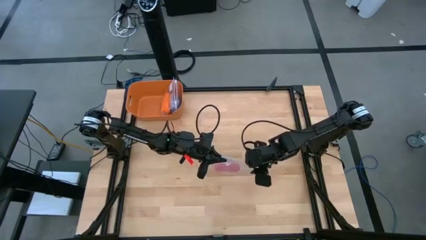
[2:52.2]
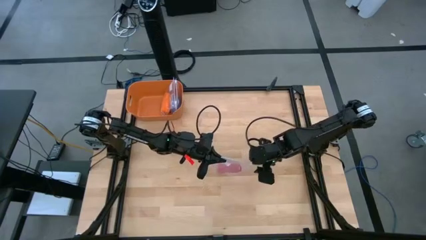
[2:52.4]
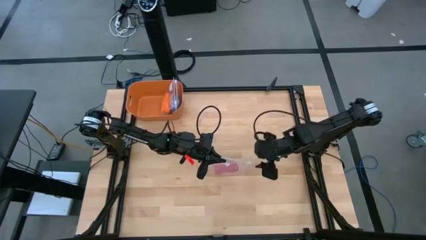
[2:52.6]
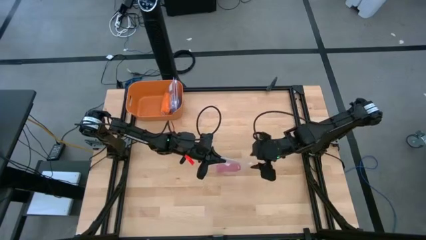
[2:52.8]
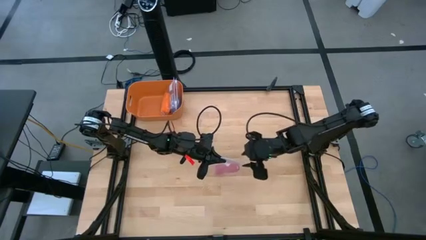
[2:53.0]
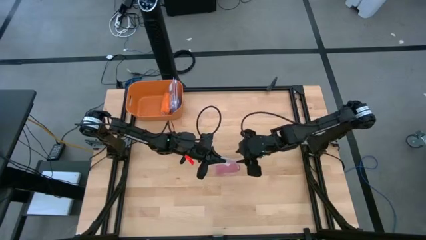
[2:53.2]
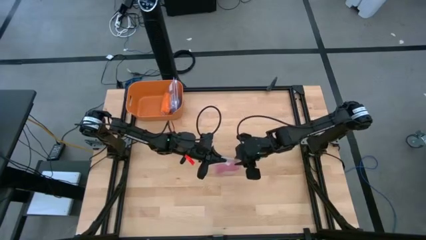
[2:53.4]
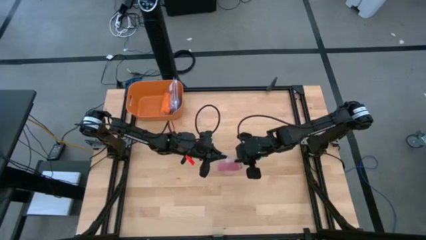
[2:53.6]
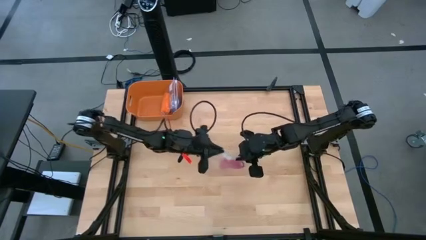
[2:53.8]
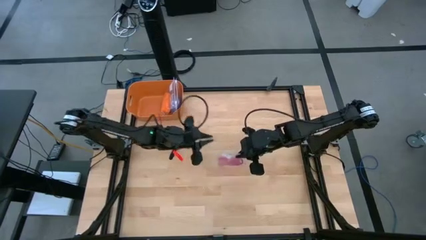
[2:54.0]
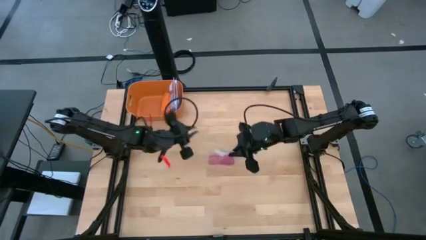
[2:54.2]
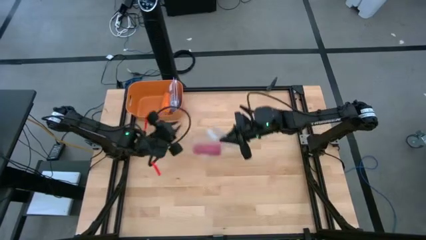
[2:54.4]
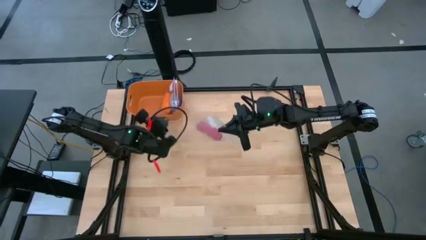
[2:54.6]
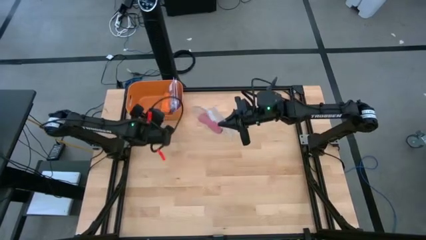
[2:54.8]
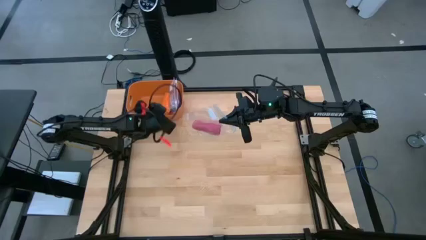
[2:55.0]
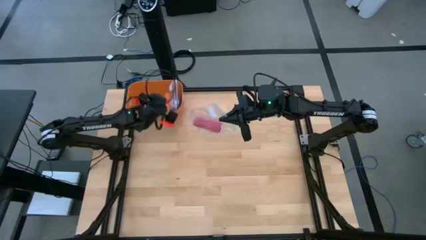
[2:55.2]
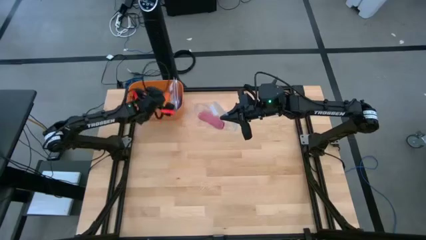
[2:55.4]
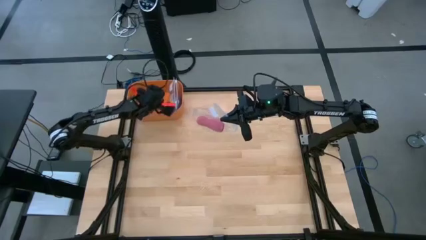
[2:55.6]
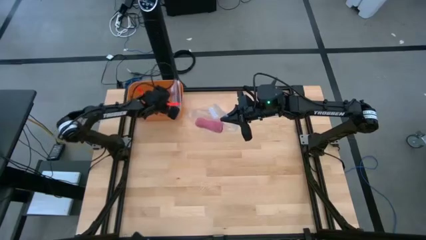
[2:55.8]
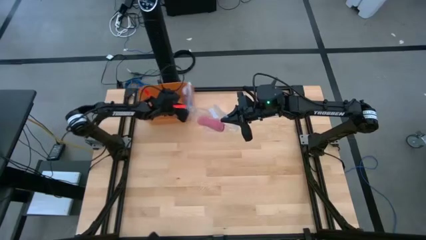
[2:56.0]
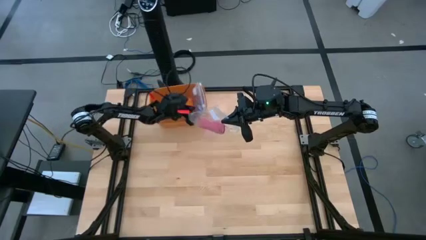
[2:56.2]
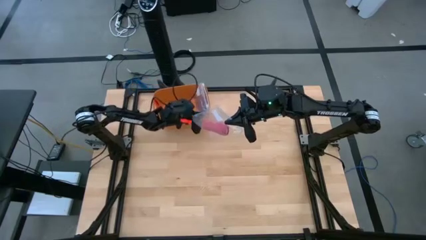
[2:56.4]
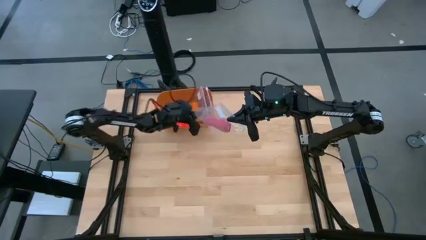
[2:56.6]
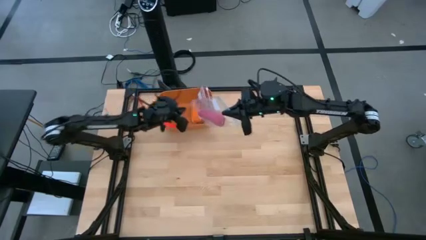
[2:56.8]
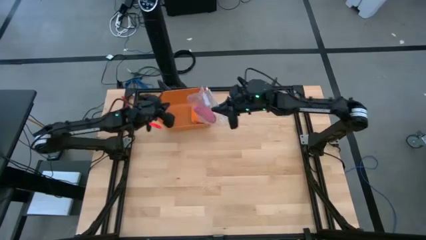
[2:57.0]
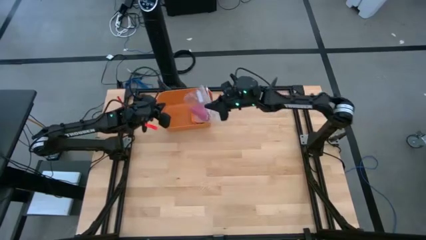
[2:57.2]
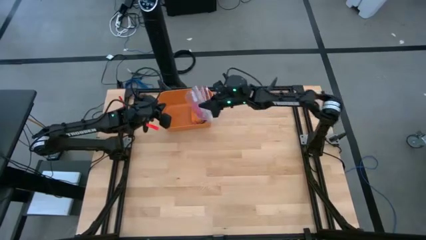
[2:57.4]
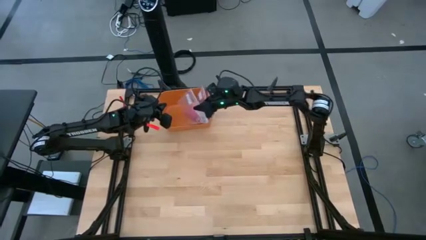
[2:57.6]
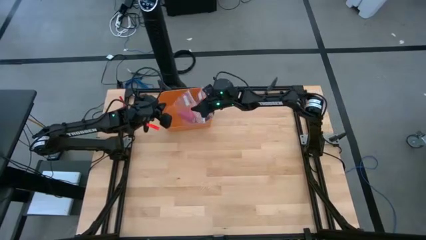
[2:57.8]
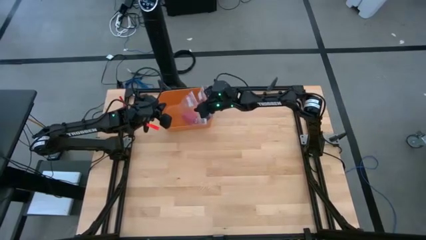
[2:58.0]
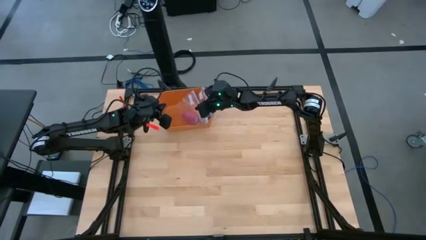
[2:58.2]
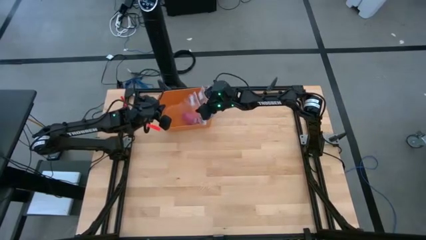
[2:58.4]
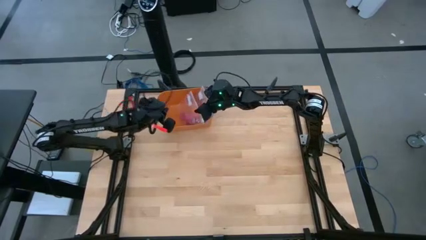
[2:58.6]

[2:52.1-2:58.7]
Task: Roll bandage
Put the transparent zip bag into the orange bin

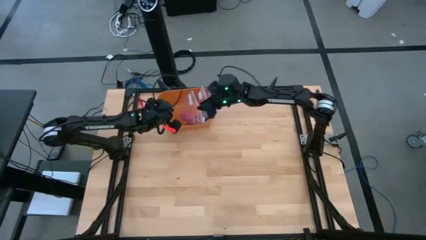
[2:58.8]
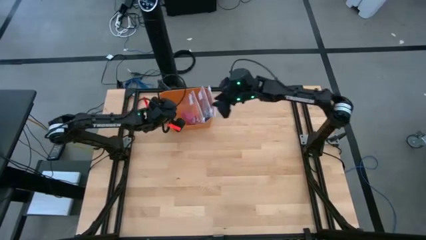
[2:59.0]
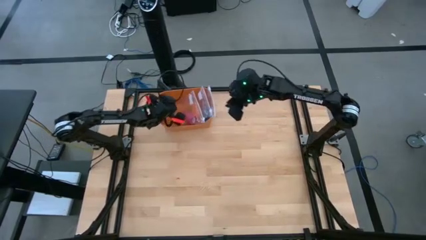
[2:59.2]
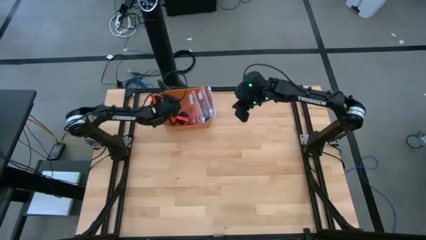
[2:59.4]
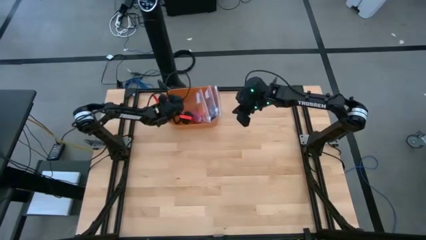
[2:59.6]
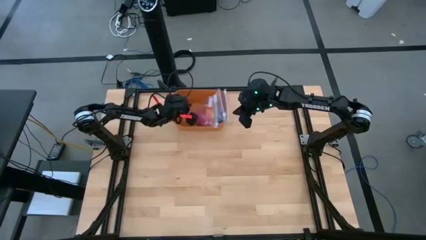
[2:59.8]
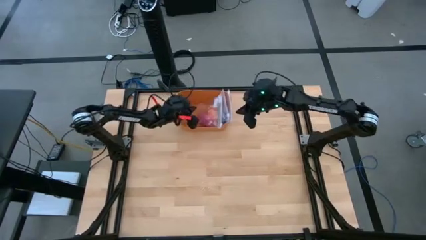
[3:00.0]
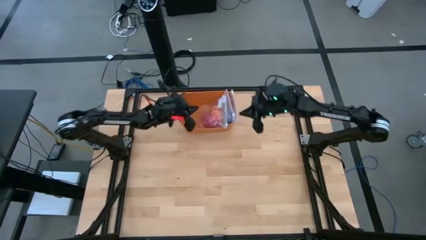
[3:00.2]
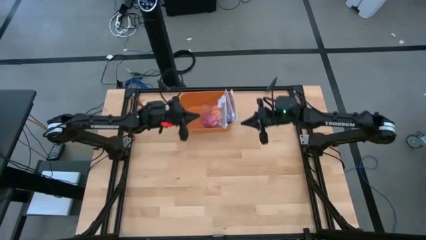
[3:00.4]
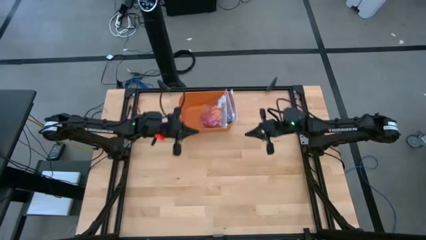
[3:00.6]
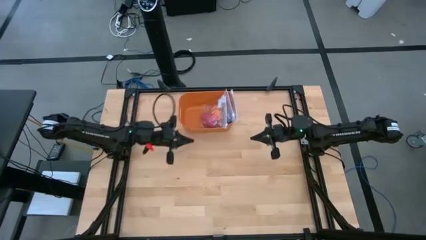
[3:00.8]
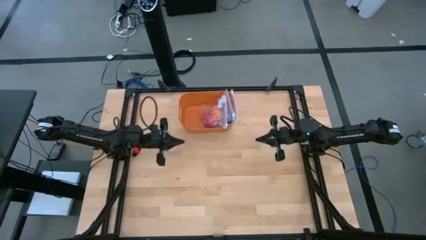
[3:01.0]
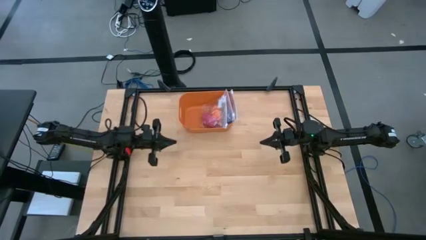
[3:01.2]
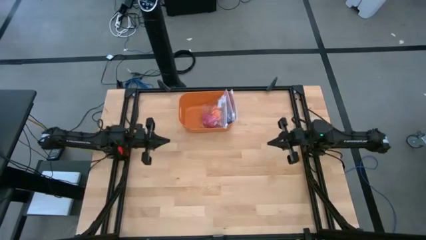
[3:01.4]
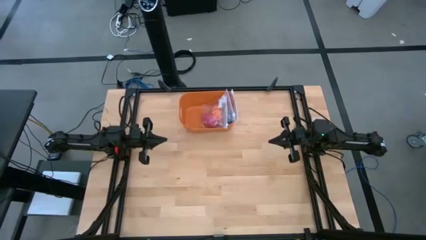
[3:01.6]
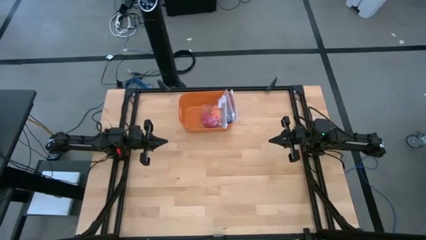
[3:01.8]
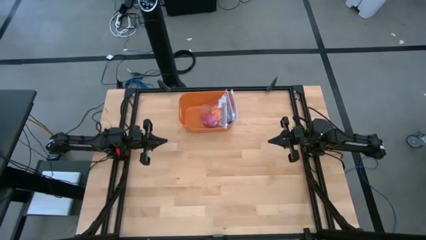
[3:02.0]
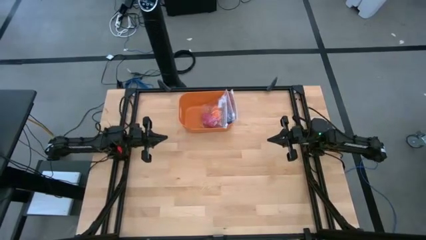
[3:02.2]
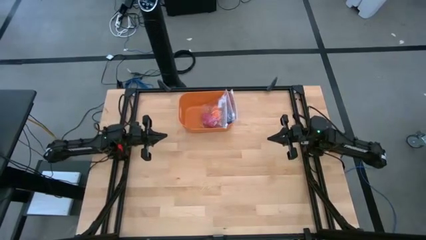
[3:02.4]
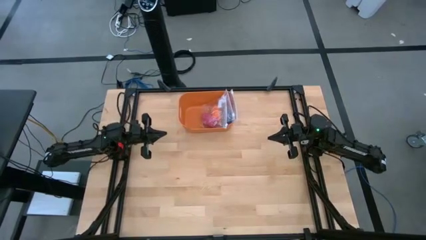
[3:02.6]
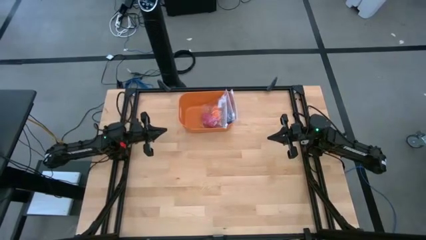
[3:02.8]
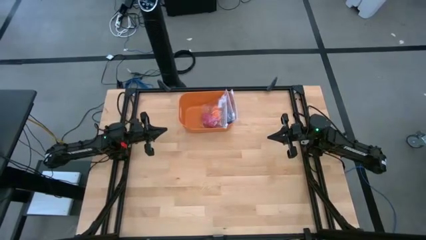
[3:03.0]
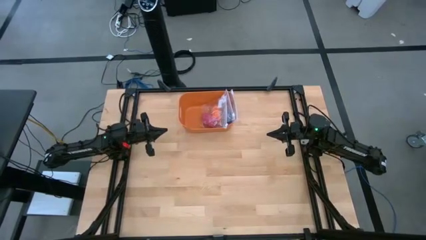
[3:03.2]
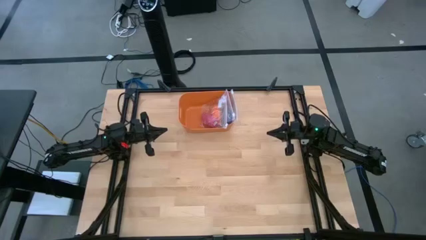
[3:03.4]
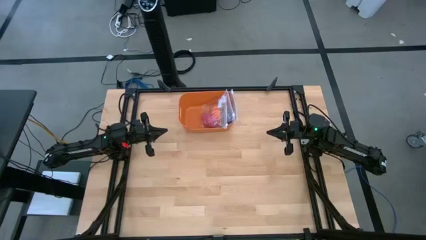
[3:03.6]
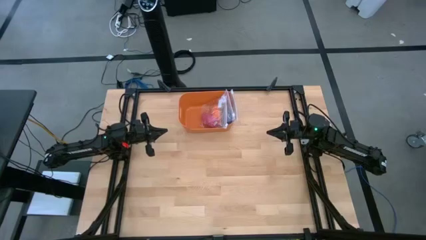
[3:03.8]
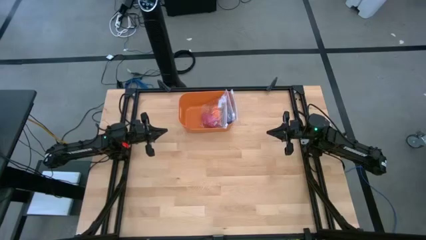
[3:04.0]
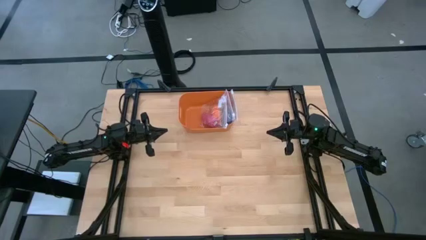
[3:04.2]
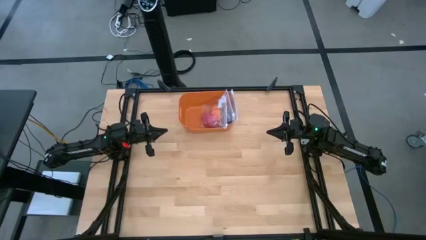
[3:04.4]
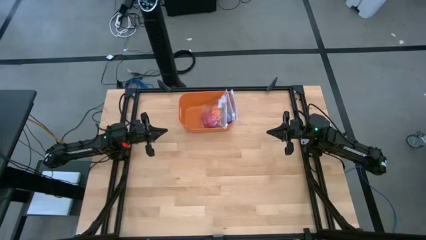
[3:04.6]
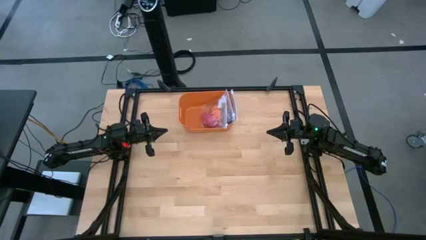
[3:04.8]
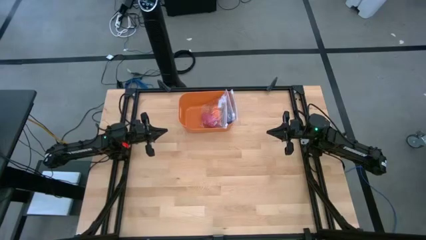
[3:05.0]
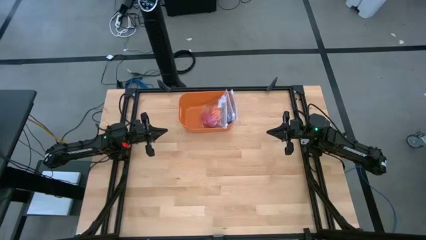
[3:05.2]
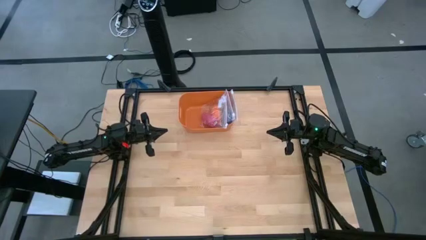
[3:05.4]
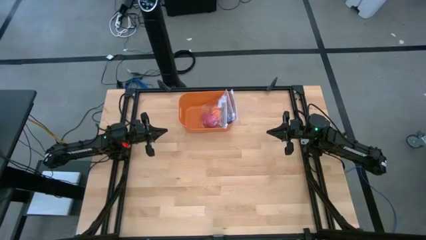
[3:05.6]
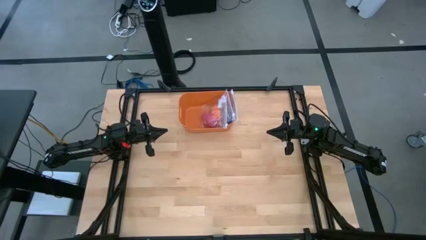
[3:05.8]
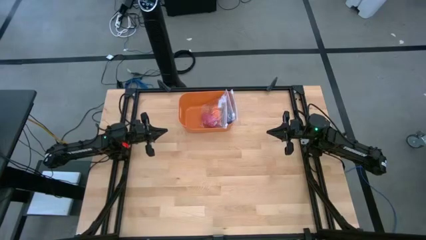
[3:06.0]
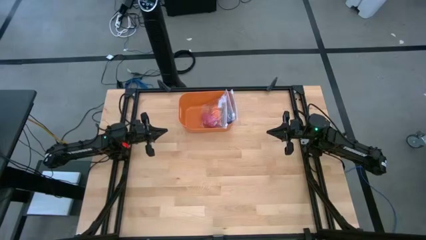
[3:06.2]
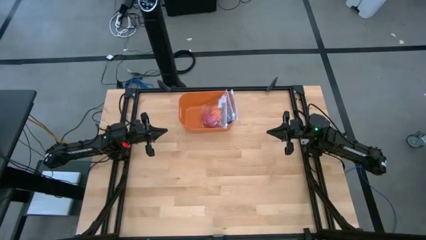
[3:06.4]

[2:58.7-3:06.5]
Return to Home Position
